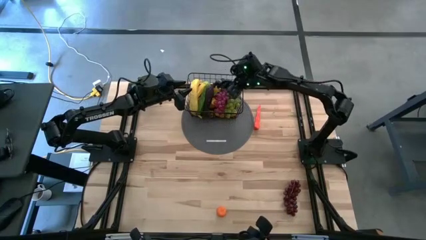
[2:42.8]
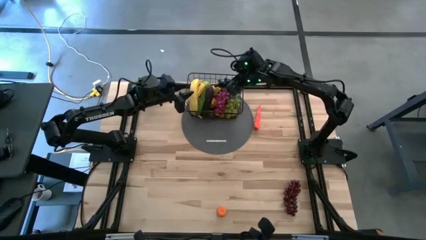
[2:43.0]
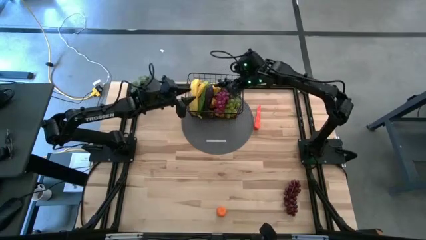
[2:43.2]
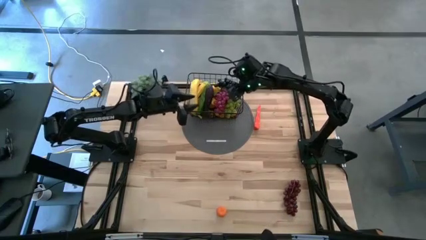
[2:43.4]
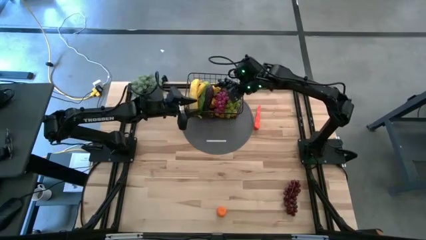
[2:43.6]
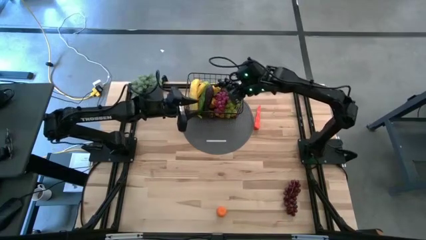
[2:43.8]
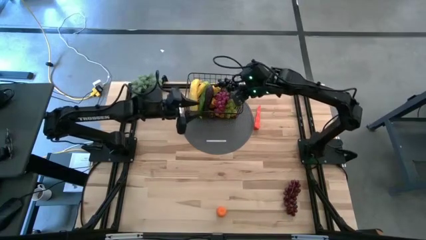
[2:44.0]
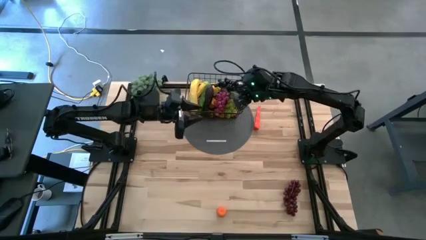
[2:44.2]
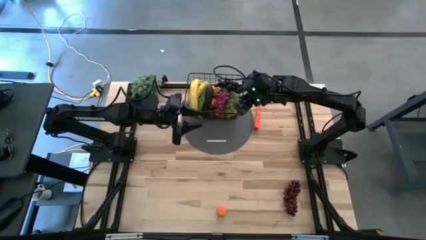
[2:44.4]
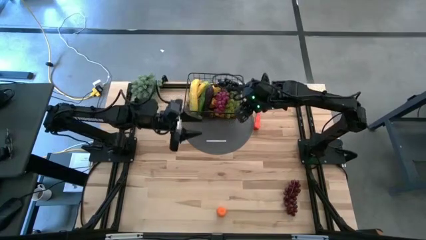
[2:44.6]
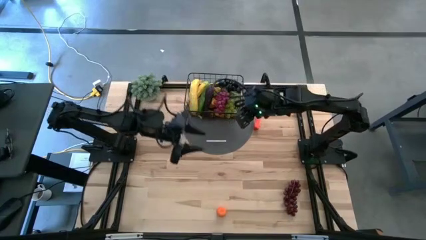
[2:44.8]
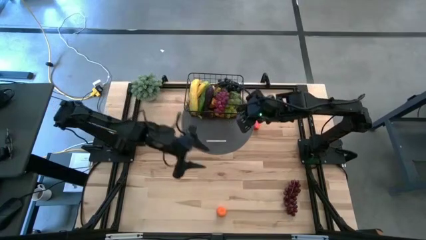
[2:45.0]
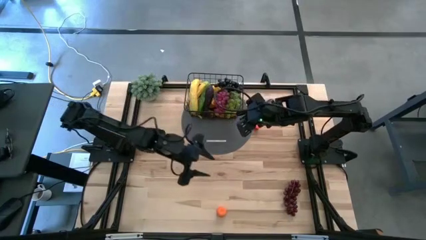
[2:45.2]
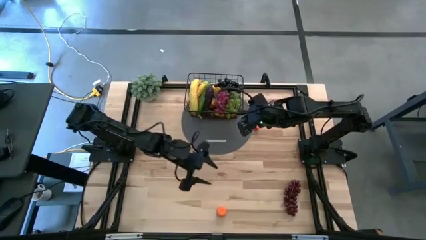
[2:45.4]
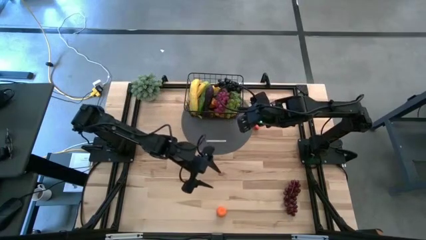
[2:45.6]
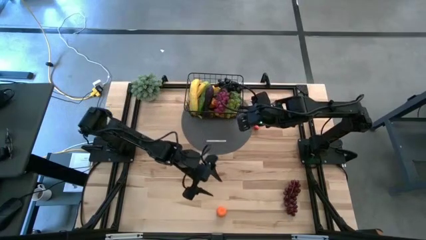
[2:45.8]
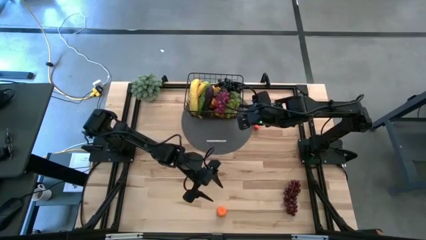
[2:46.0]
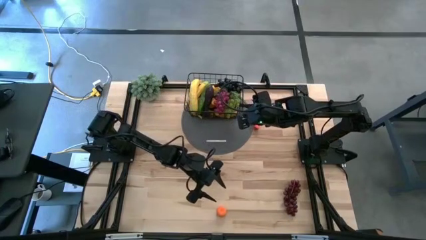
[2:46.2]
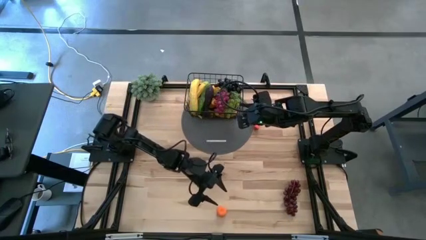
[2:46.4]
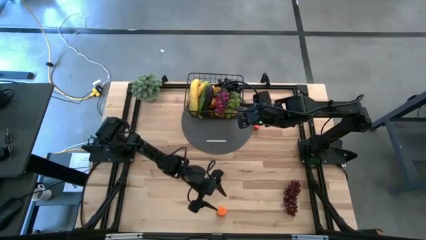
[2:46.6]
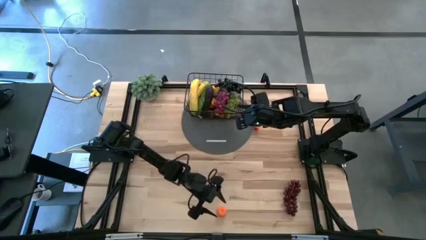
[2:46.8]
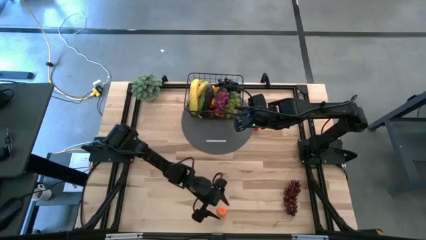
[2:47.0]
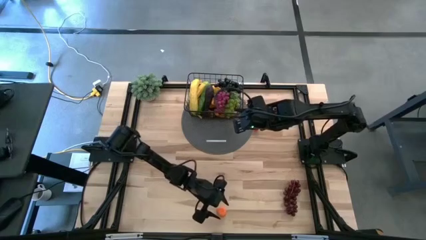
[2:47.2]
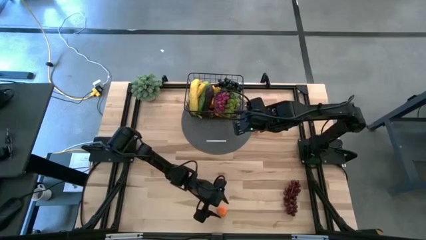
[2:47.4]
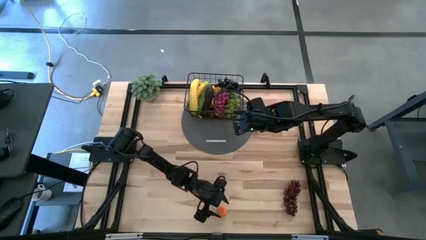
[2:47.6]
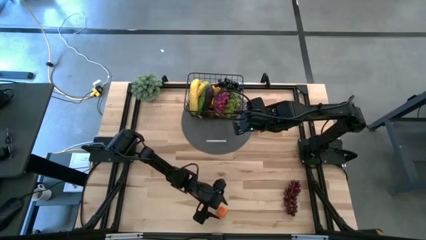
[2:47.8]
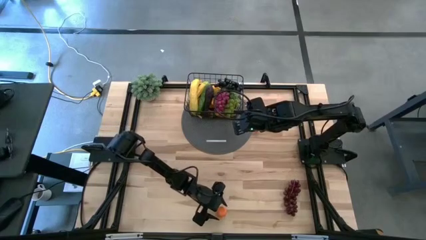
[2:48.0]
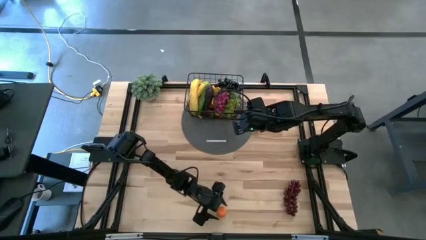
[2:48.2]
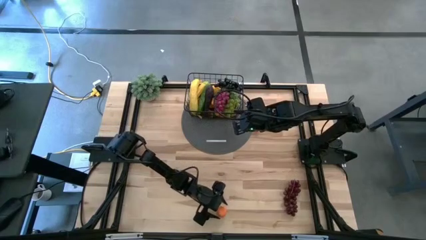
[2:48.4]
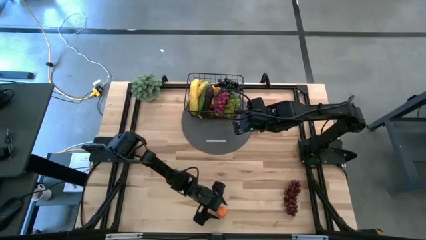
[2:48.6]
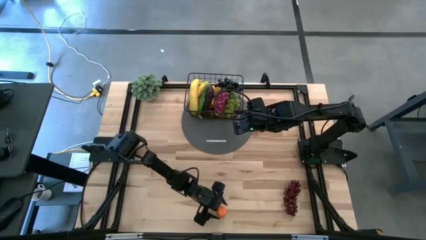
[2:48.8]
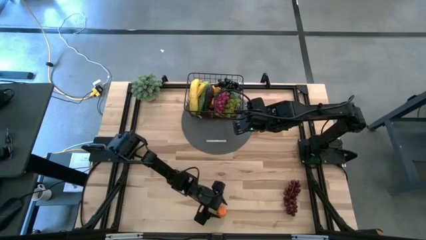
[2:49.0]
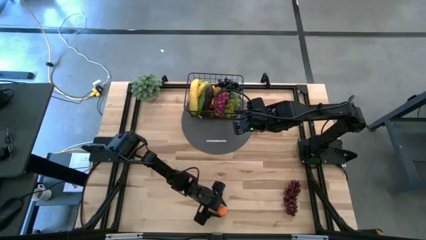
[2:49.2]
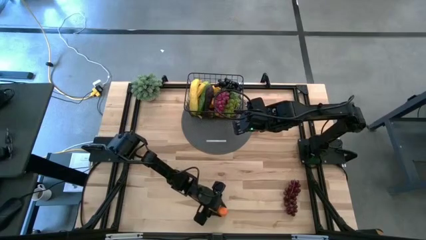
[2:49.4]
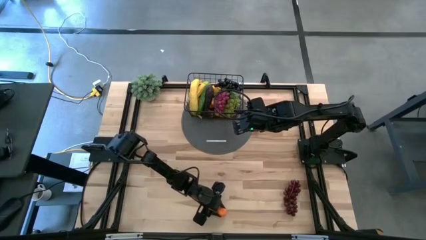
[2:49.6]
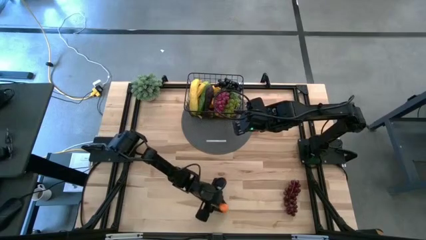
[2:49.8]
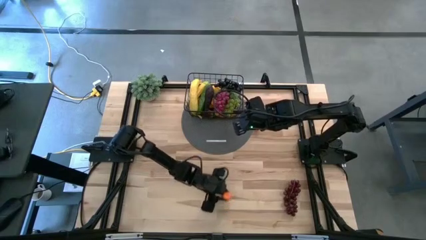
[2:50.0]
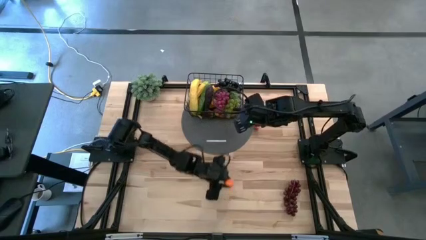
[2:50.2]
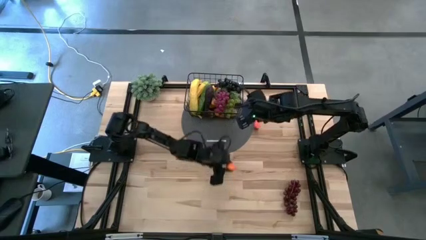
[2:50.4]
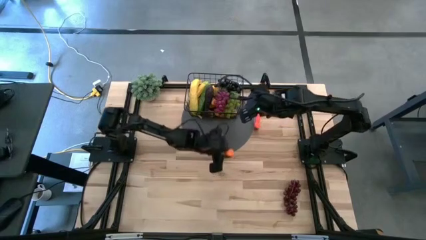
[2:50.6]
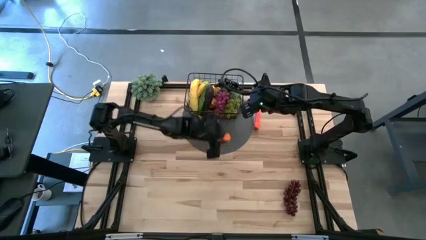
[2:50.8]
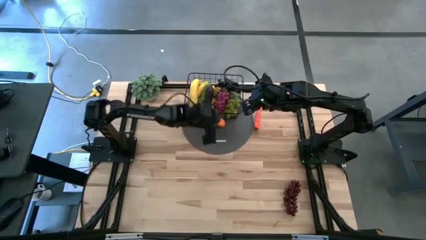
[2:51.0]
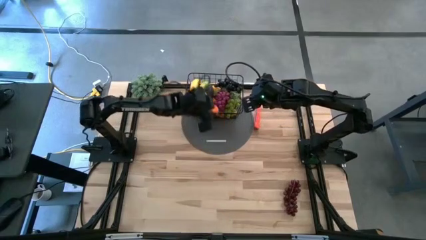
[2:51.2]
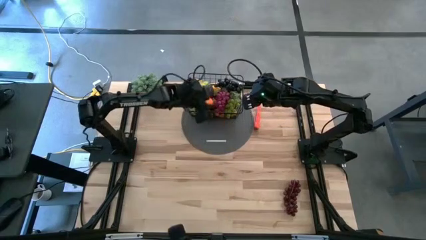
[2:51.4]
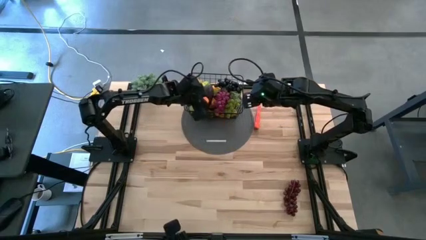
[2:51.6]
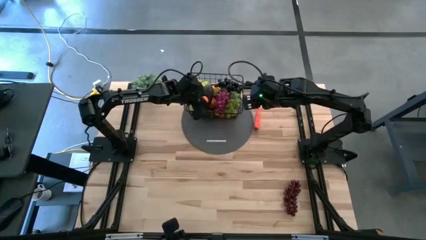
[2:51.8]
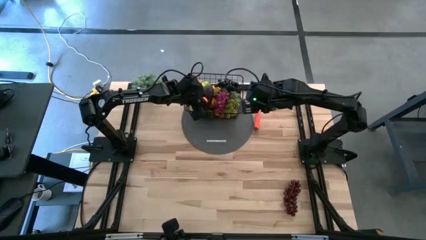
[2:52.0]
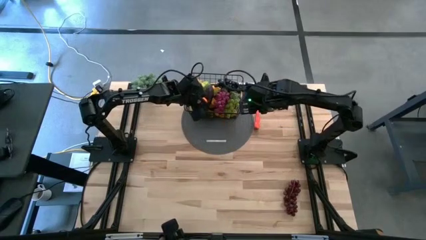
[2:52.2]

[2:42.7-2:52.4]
Task: Build produce basket
Put the orange into the black wire basket

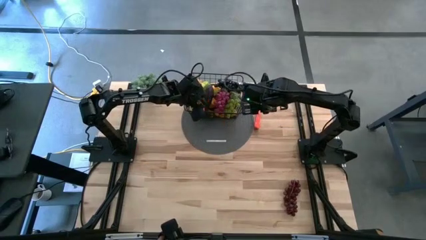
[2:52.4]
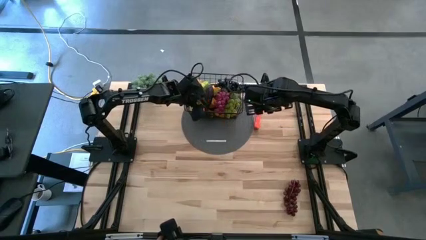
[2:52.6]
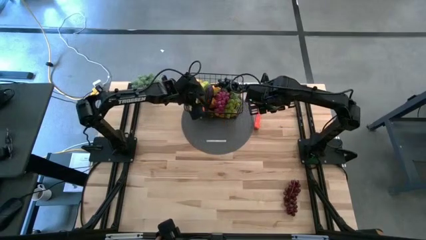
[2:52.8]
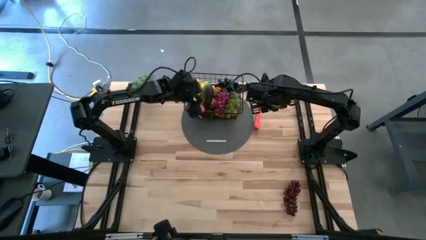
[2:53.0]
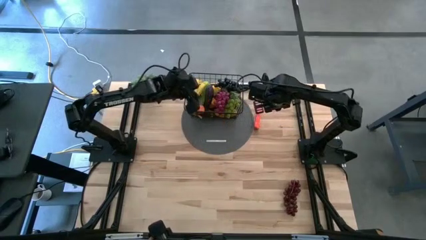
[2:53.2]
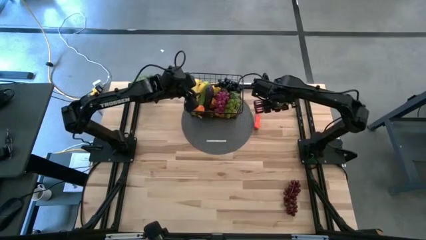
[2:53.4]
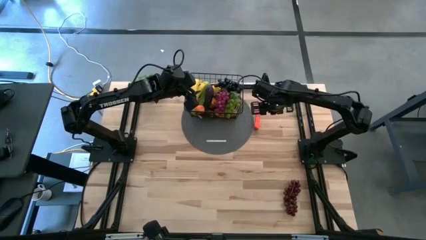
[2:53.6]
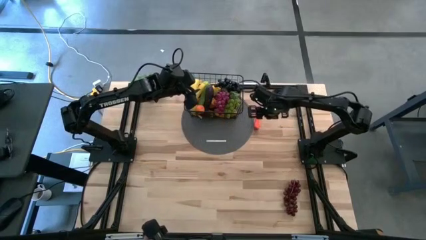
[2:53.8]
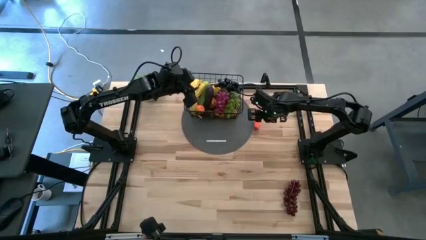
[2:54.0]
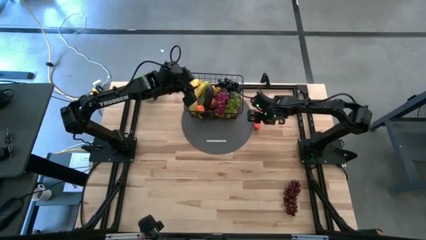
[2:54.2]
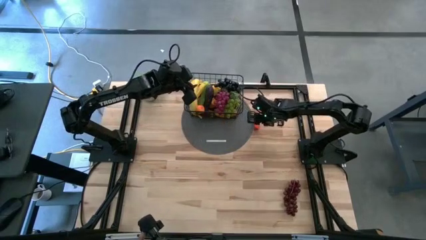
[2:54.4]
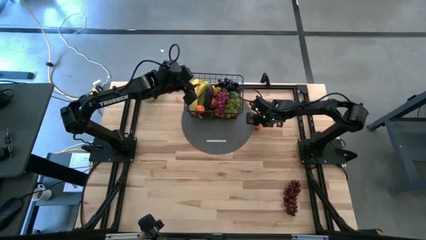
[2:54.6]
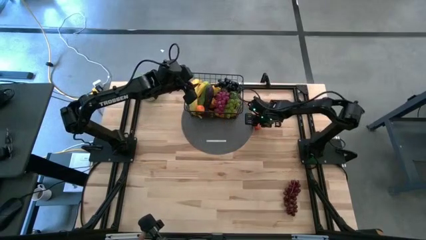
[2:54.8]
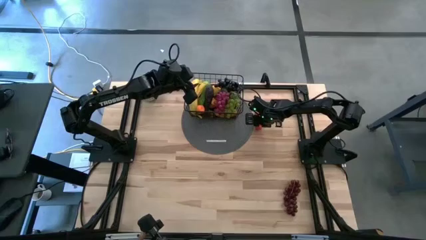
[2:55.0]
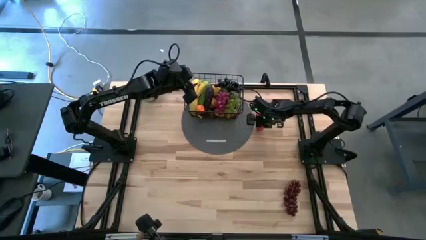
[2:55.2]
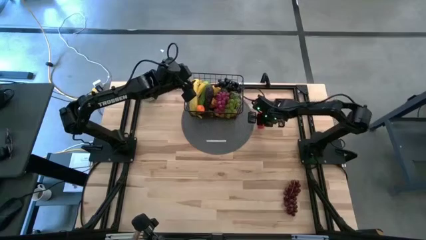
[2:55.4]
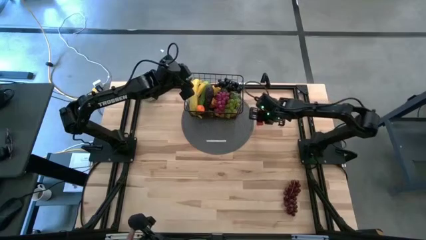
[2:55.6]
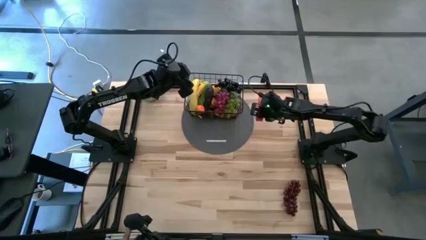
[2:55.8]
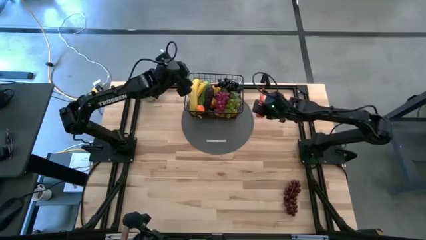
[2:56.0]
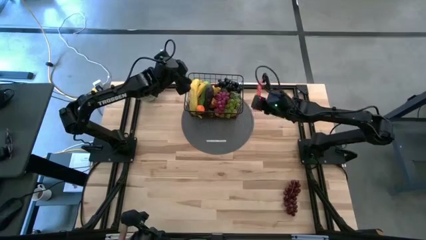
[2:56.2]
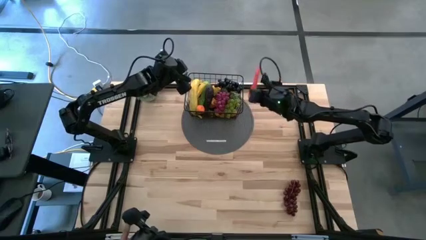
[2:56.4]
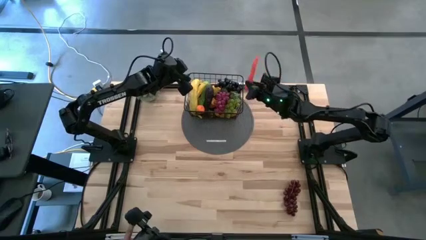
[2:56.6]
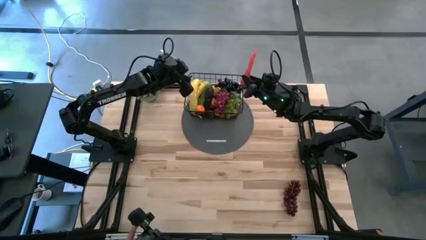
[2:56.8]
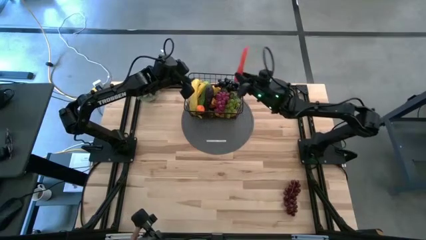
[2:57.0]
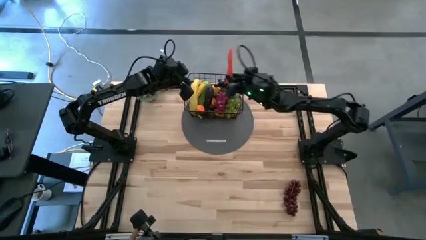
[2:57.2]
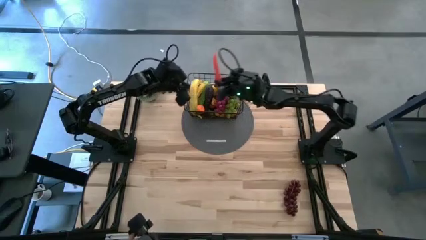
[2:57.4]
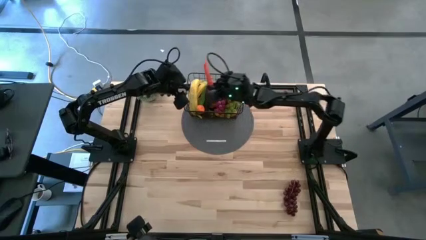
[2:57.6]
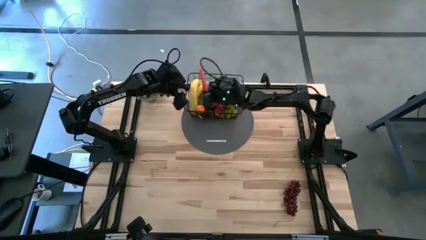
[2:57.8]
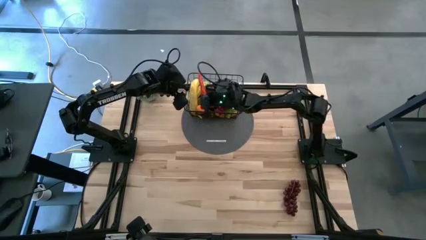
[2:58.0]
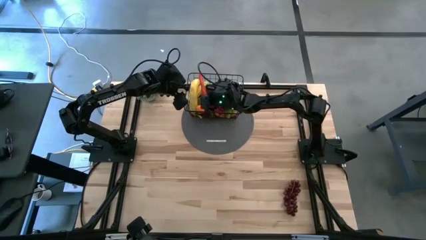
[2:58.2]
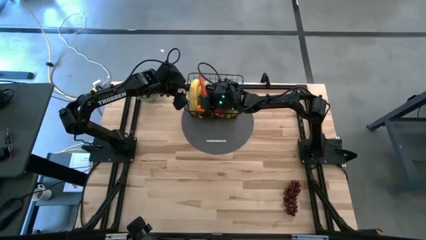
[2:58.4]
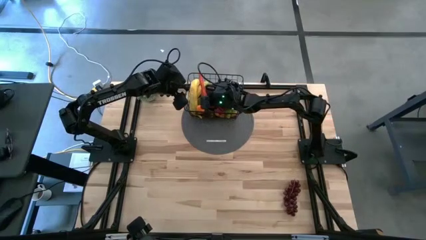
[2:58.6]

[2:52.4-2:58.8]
Put the carrot into the black wire basket
